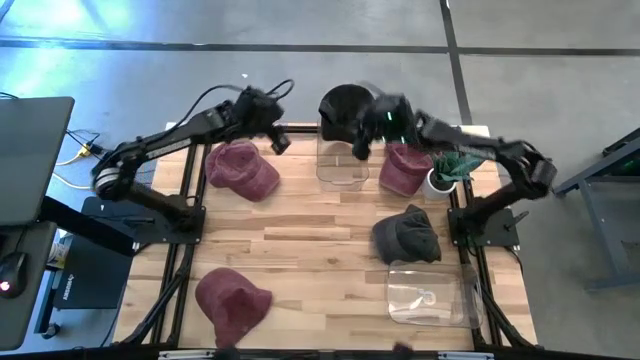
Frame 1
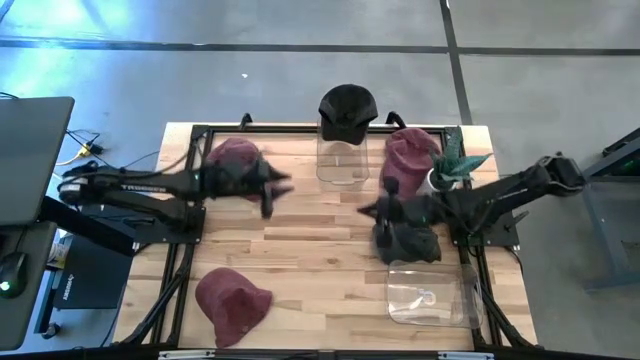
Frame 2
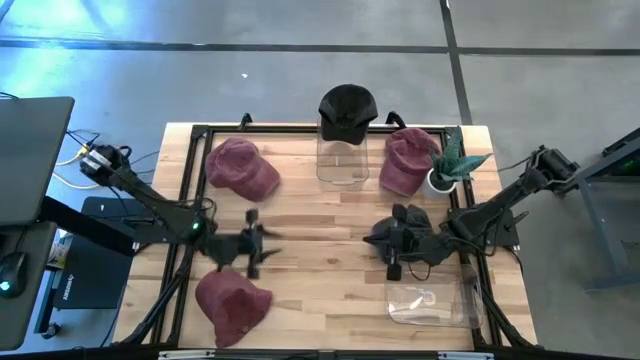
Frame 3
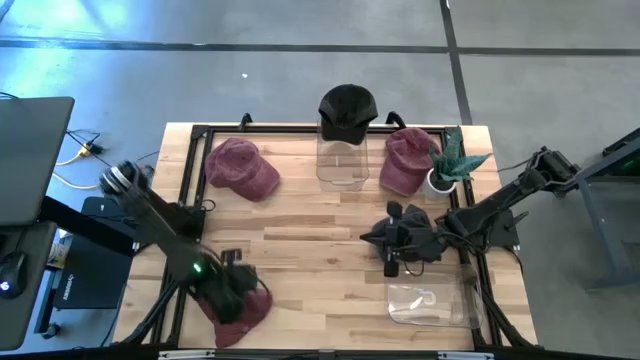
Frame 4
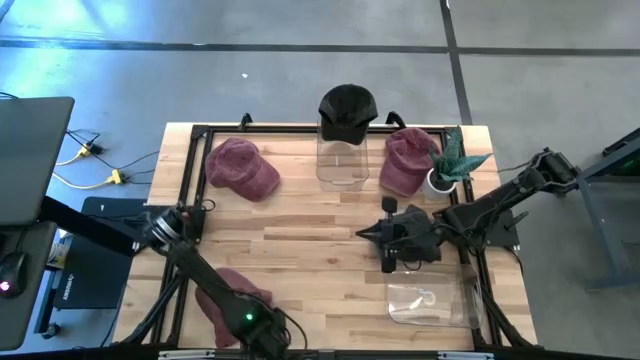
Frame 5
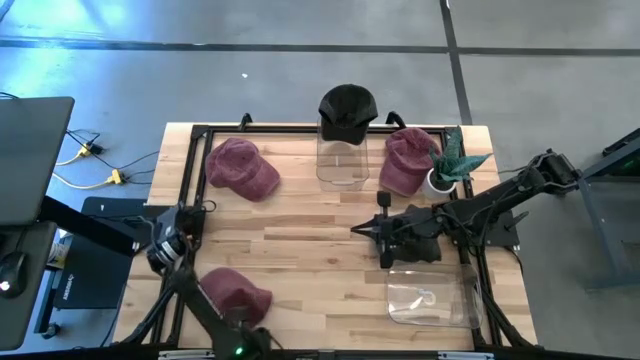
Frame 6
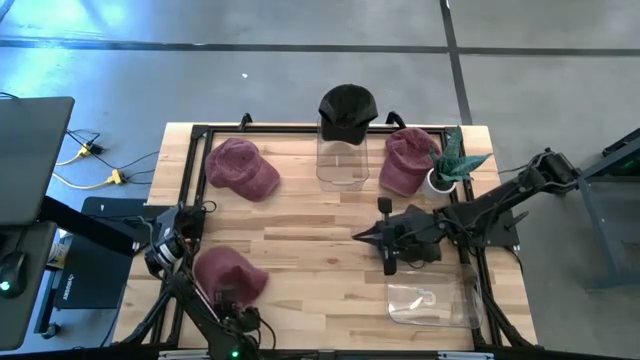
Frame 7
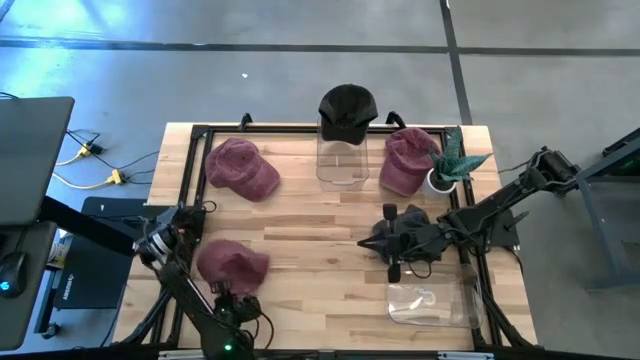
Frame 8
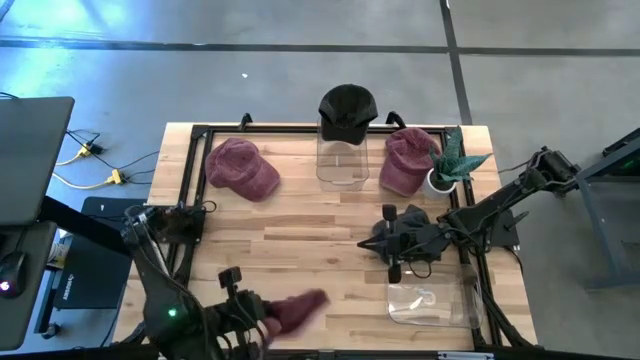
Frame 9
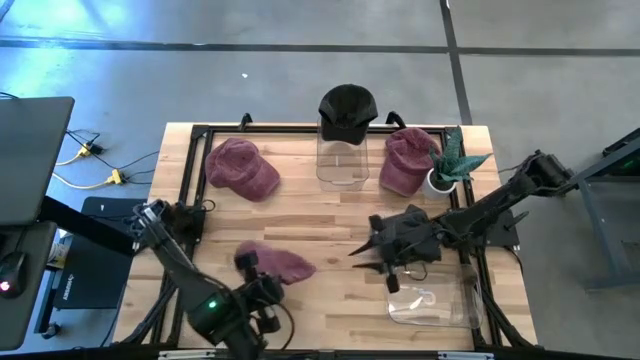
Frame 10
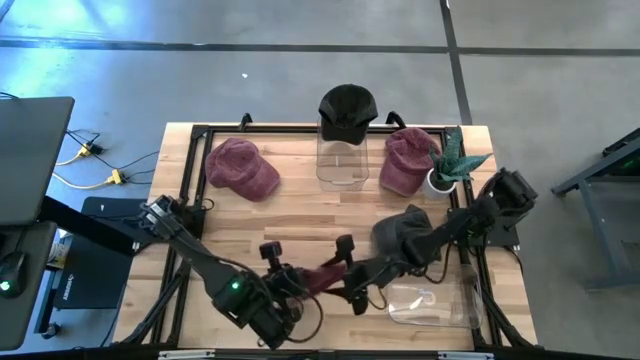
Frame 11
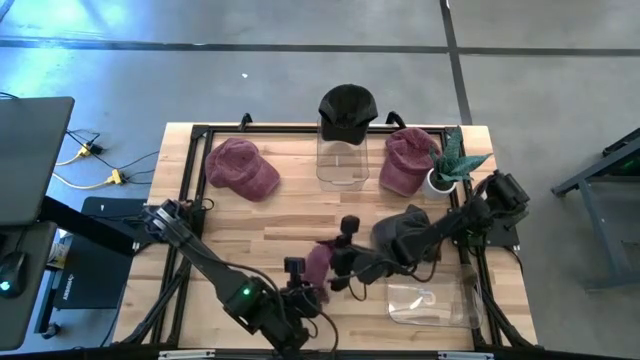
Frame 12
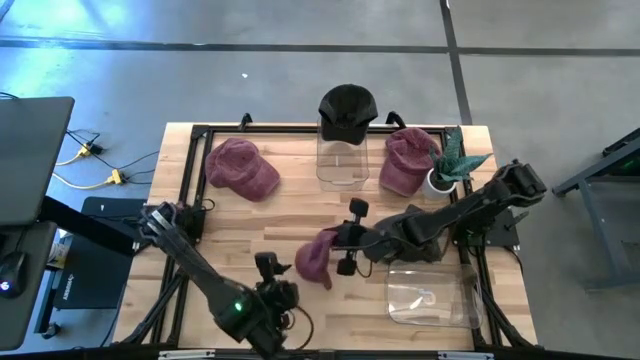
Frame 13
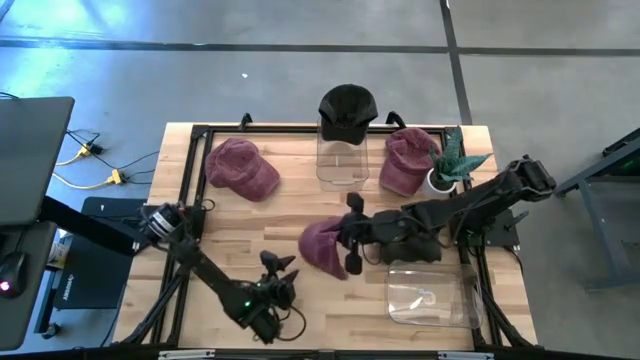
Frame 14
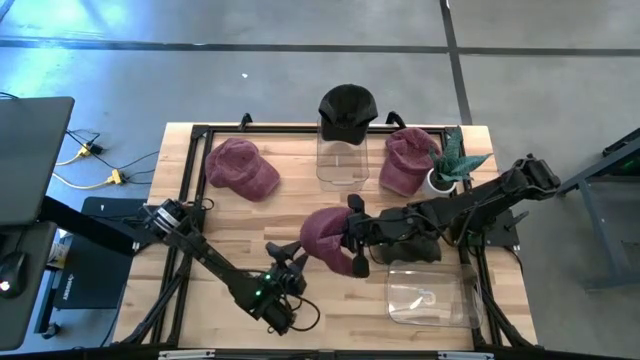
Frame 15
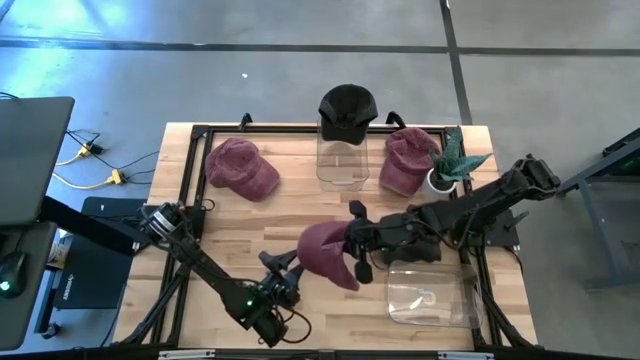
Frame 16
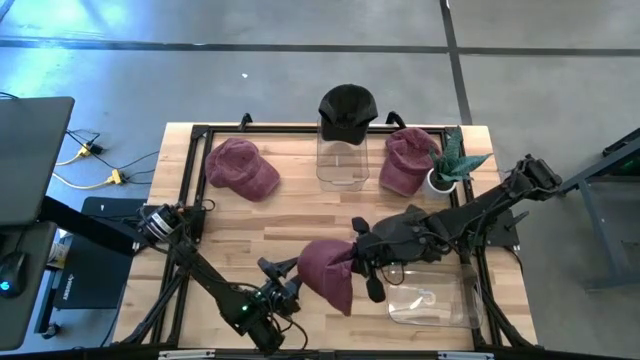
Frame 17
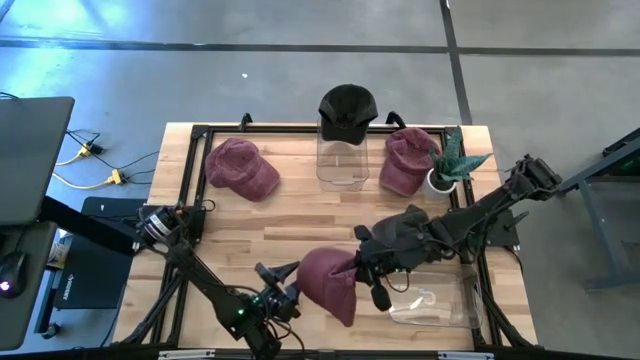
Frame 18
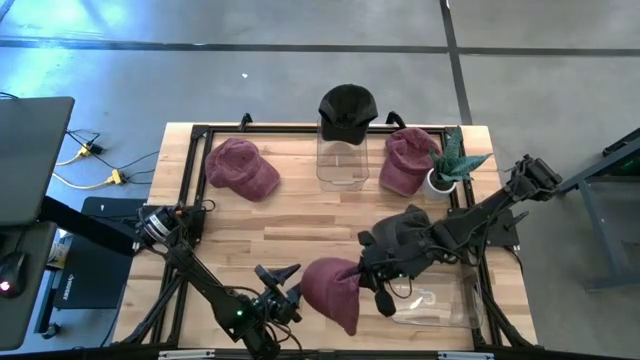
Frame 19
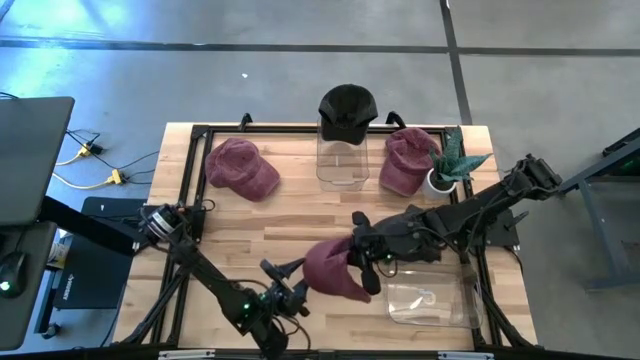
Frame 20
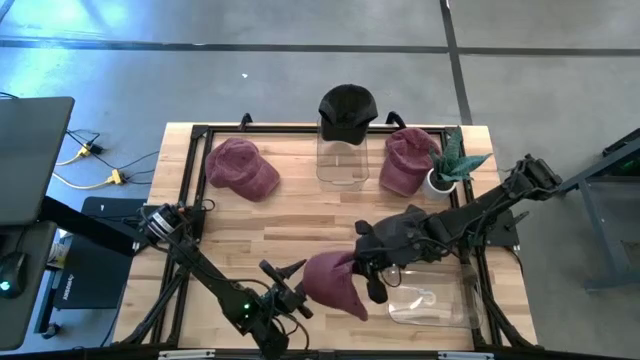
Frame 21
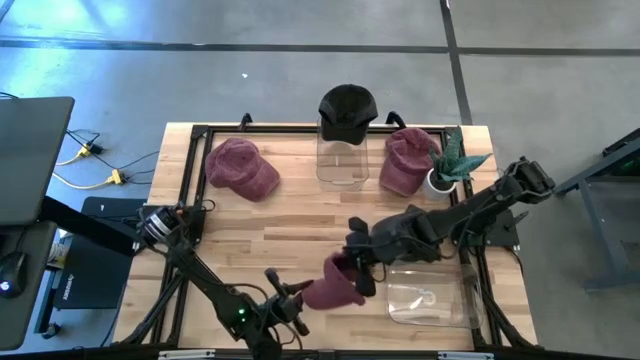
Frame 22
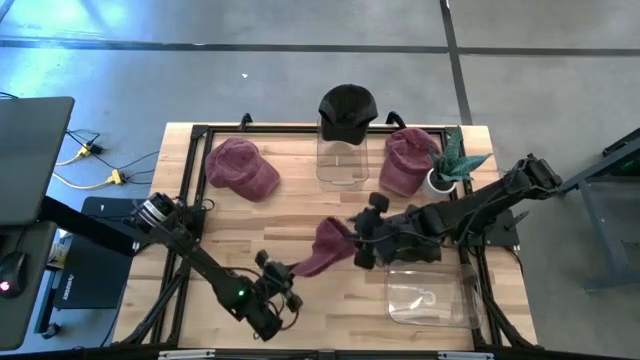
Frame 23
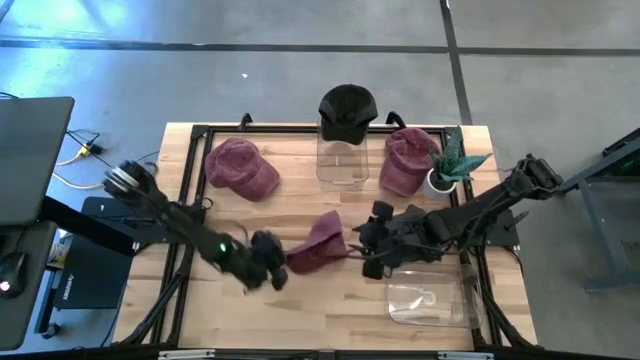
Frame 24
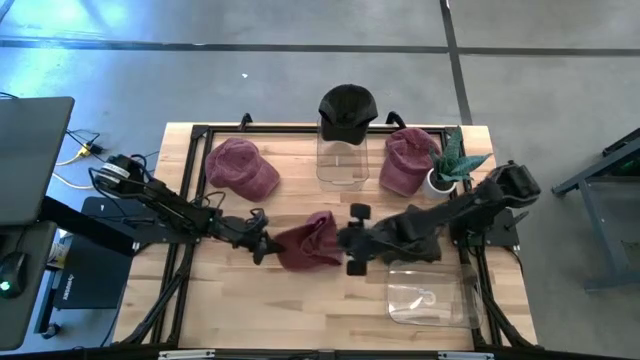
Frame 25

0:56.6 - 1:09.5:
Task: Pick & Place hat
Put the bottom red cap into the bottom transparent bin

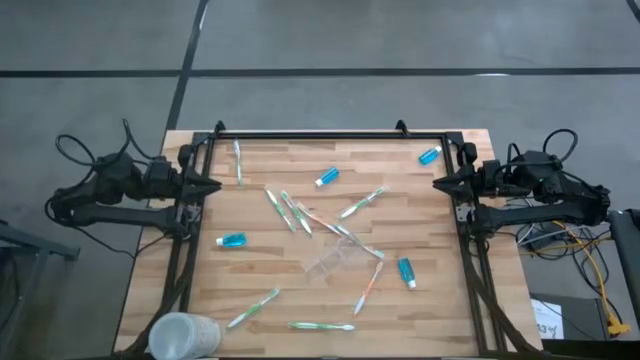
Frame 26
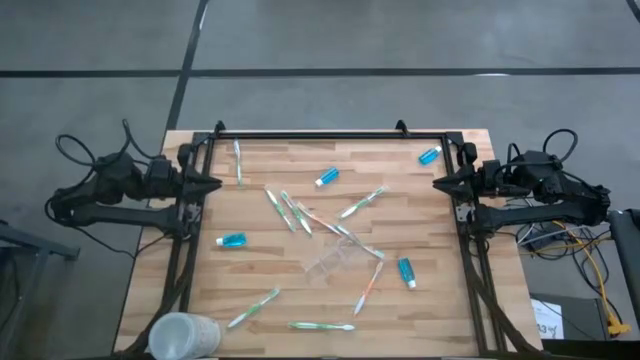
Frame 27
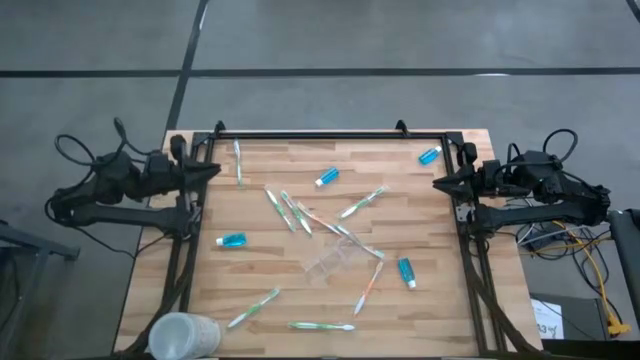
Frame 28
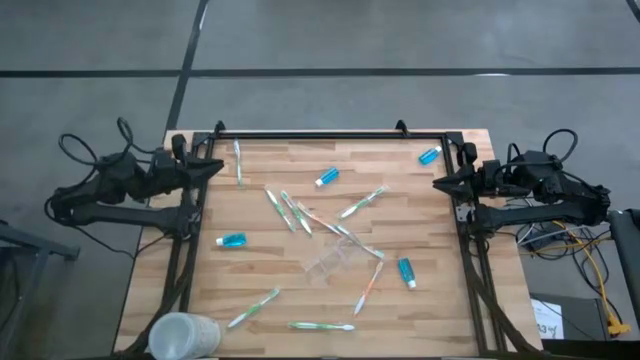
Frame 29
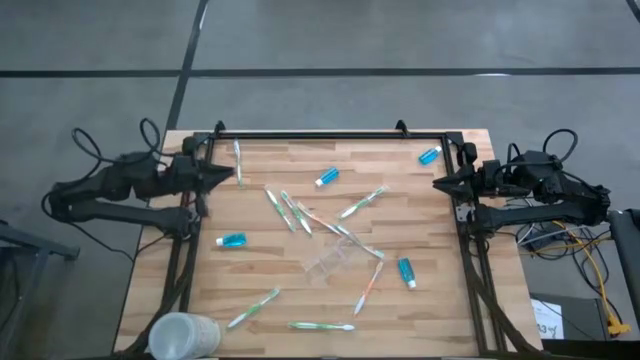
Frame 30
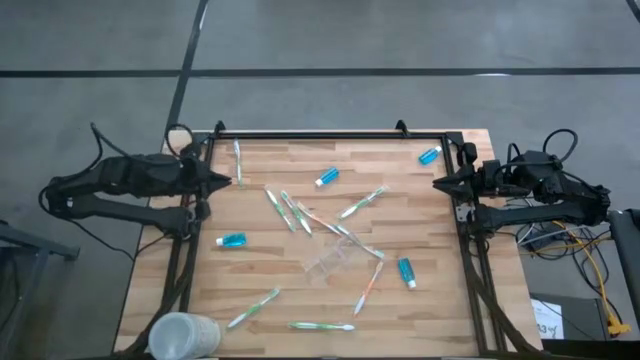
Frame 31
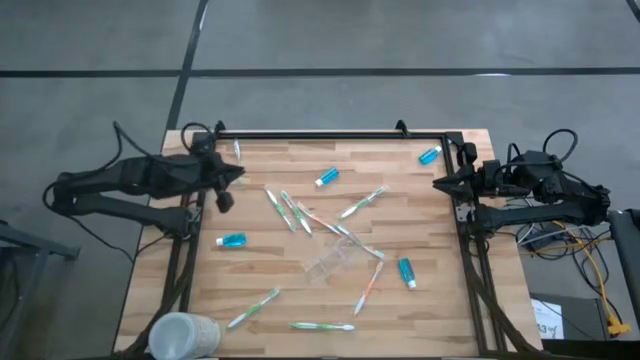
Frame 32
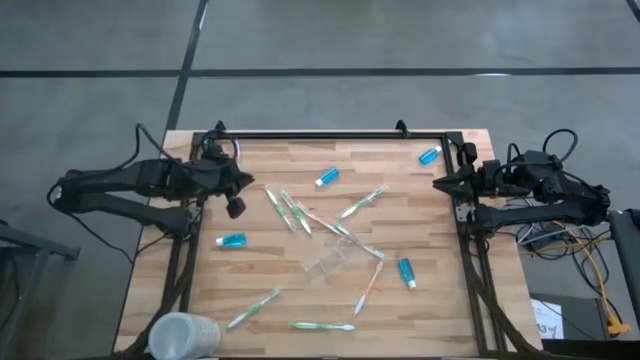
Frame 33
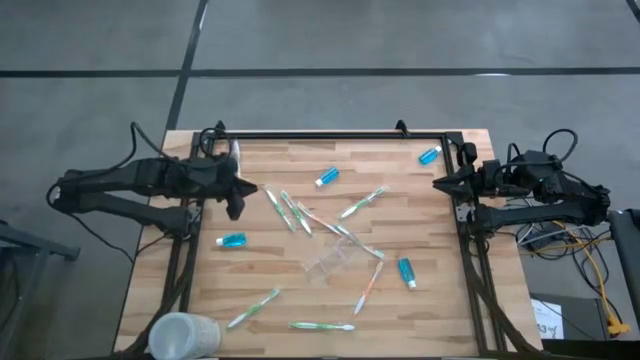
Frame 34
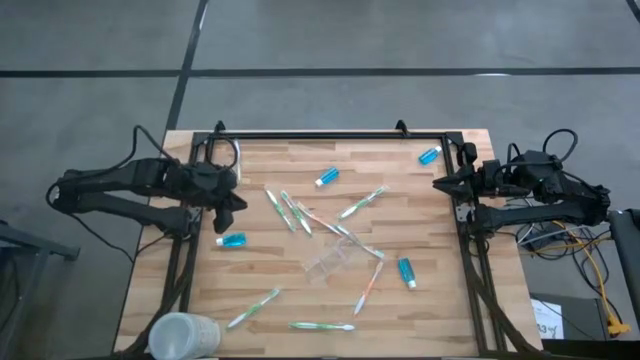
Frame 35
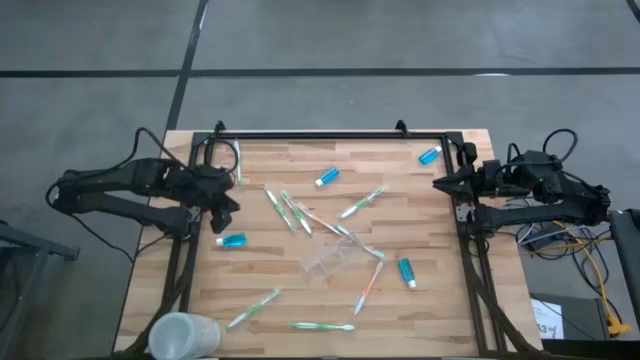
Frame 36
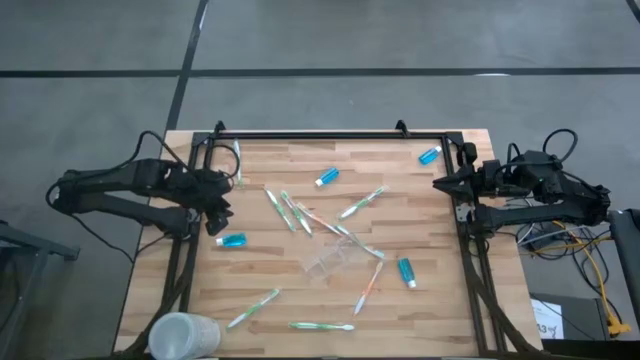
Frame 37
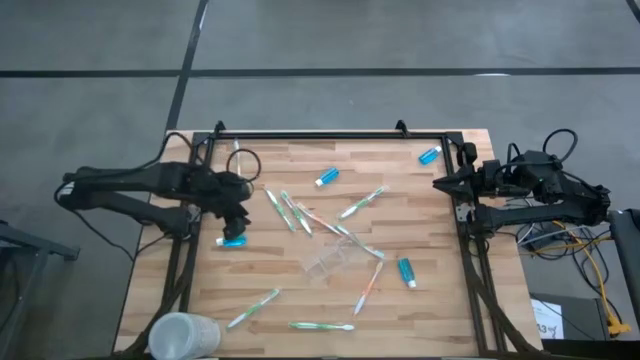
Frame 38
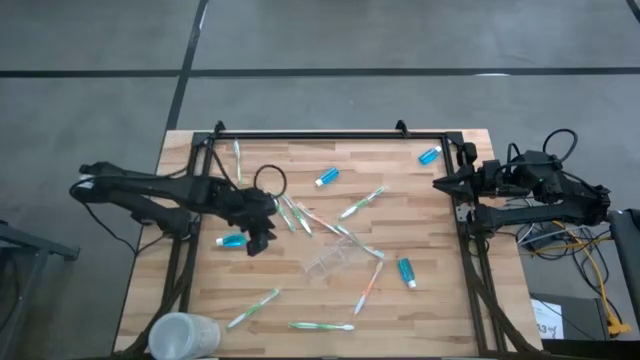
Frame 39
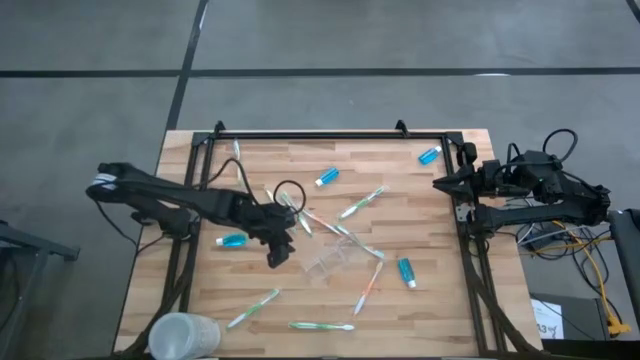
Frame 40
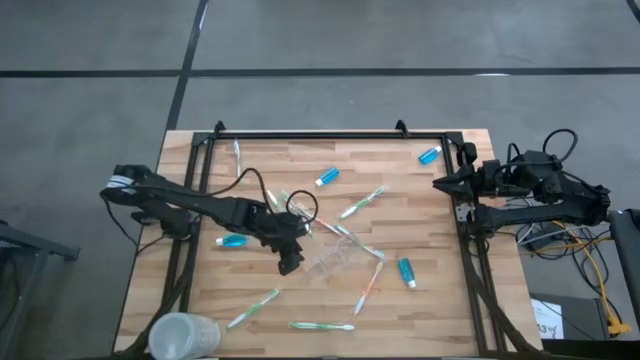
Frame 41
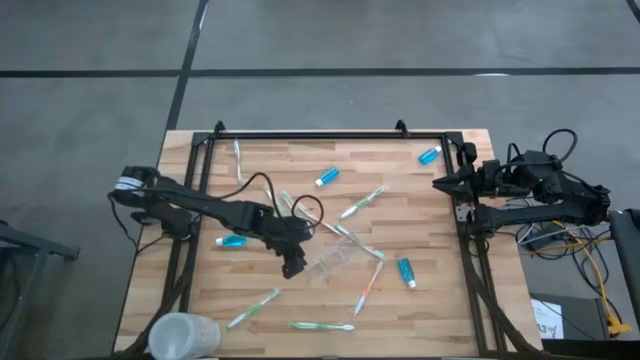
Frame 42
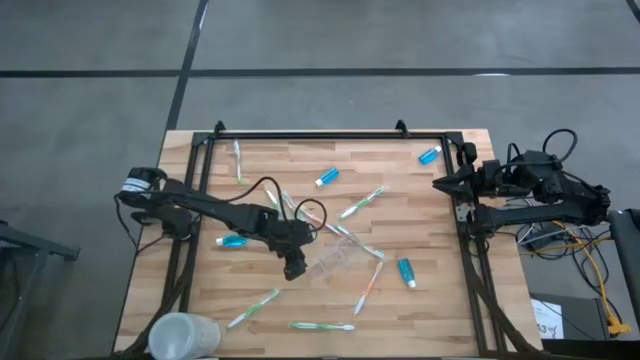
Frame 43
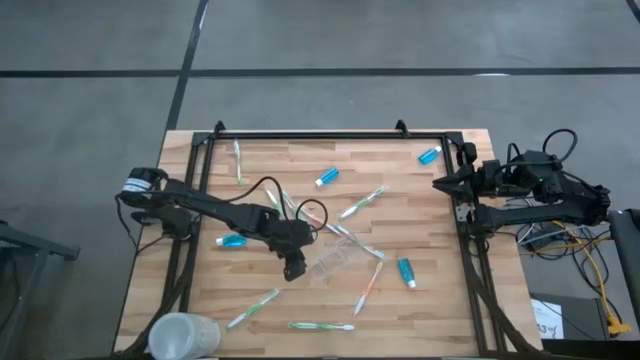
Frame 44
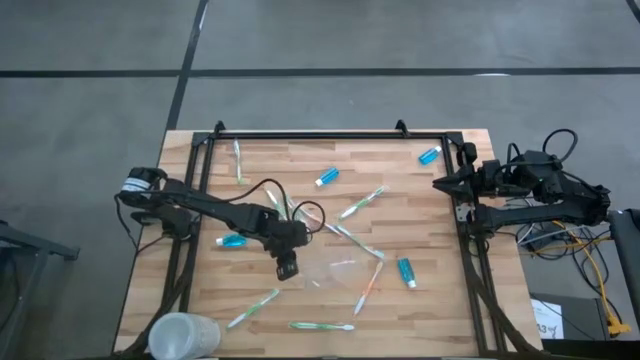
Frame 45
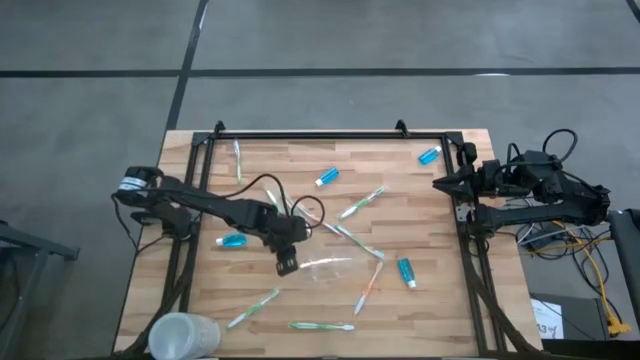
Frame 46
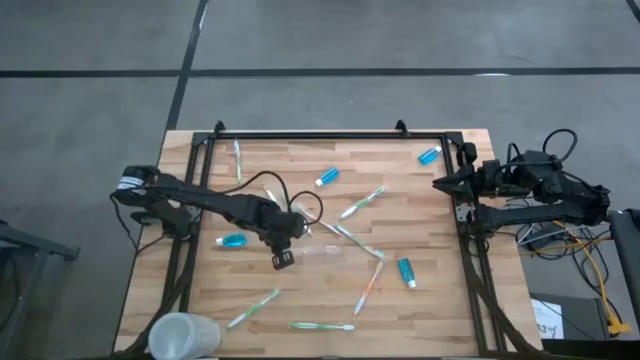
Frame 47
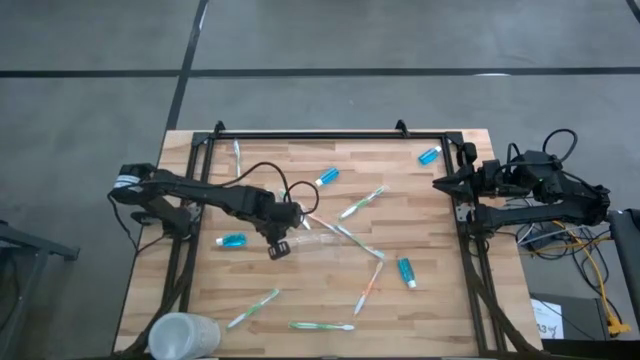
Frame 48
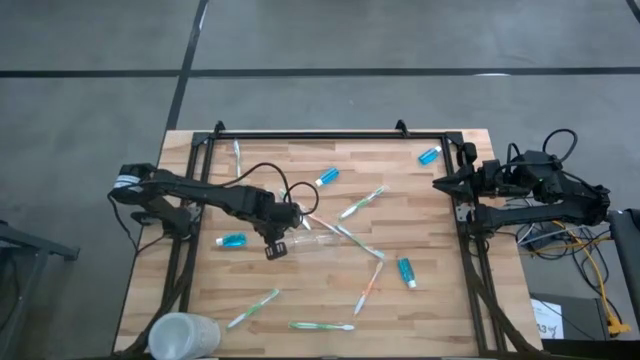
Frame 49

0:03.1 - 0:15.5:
Task: Pick & Place toothbrushing station
Adjust the transparent organizer on the table
